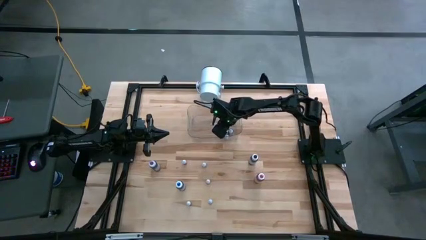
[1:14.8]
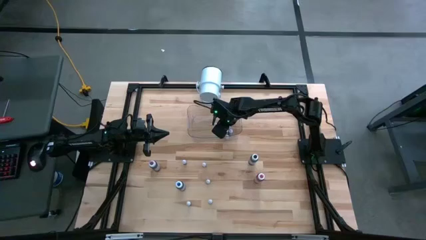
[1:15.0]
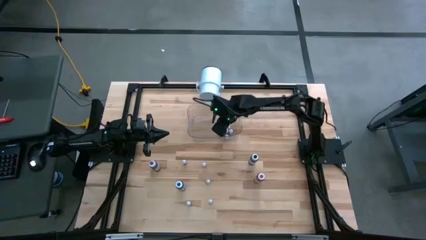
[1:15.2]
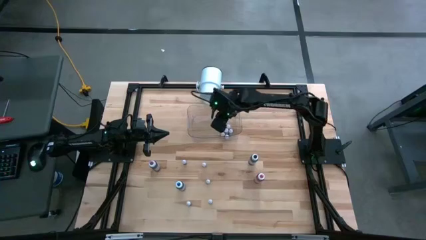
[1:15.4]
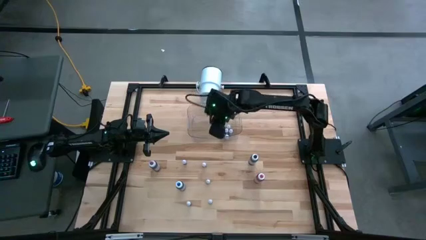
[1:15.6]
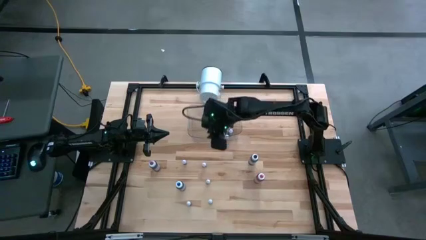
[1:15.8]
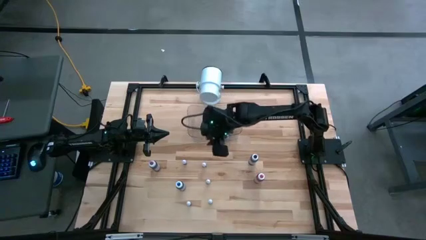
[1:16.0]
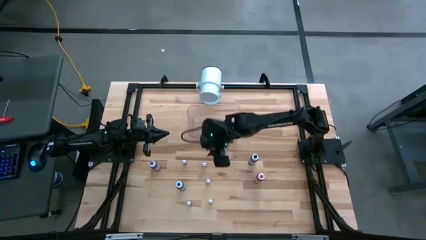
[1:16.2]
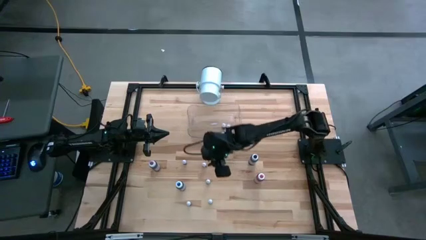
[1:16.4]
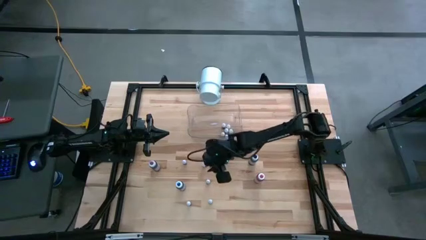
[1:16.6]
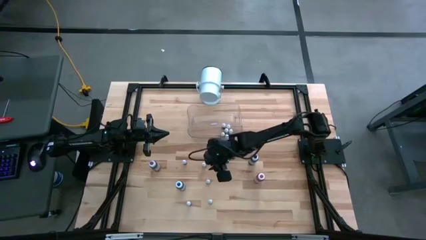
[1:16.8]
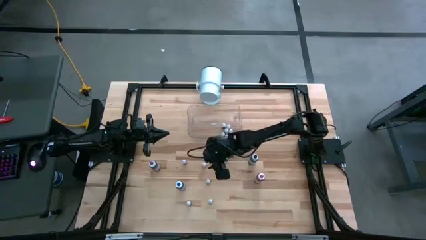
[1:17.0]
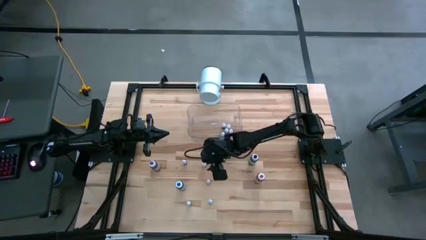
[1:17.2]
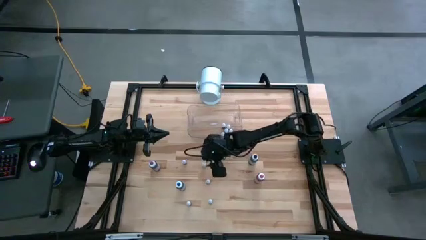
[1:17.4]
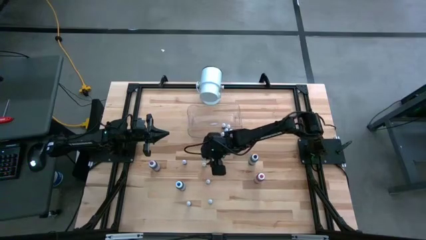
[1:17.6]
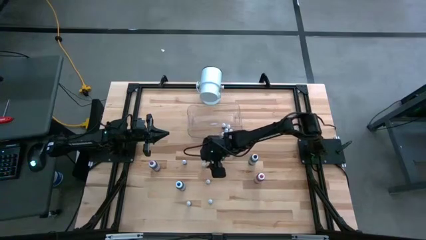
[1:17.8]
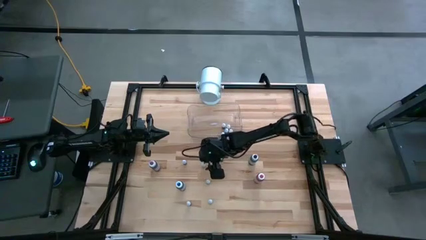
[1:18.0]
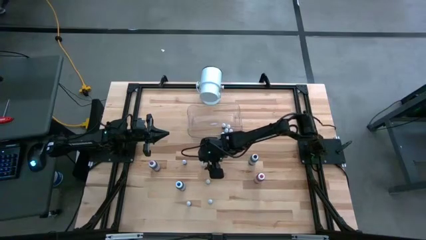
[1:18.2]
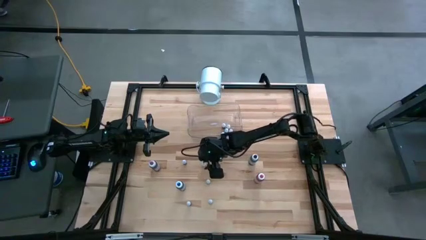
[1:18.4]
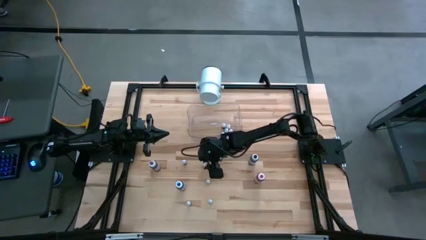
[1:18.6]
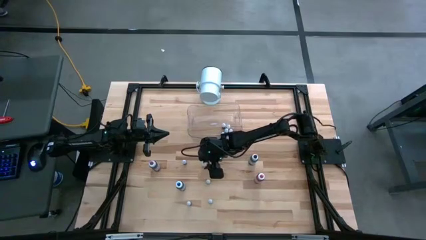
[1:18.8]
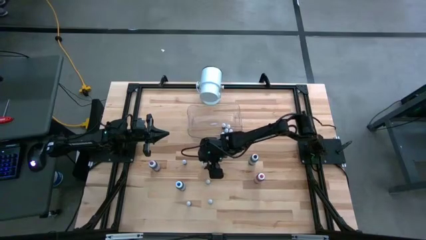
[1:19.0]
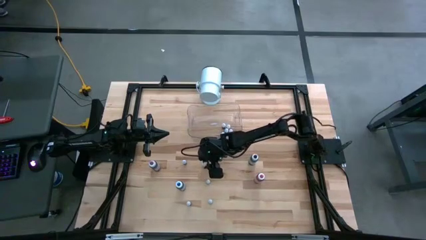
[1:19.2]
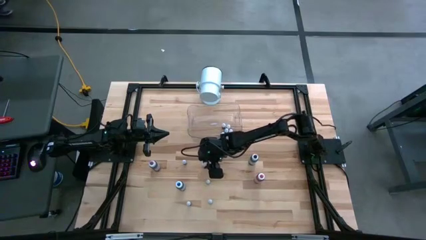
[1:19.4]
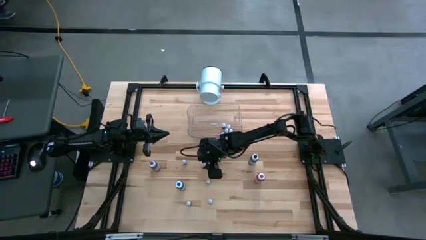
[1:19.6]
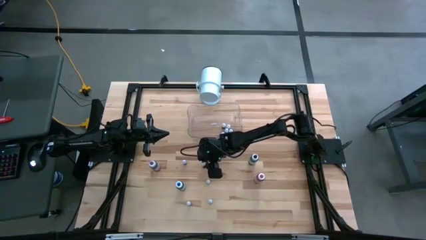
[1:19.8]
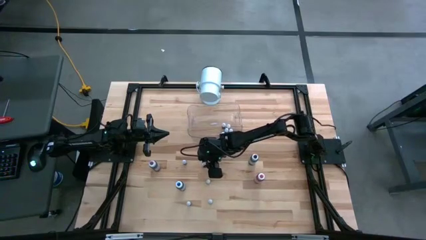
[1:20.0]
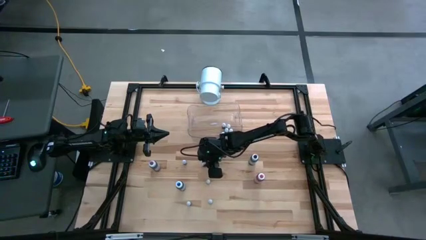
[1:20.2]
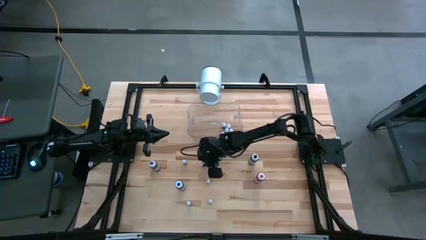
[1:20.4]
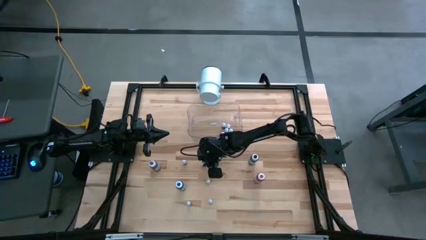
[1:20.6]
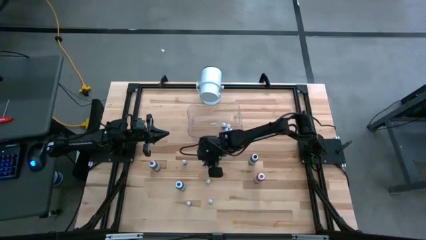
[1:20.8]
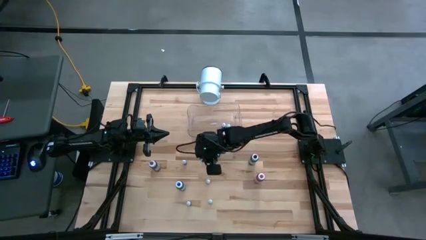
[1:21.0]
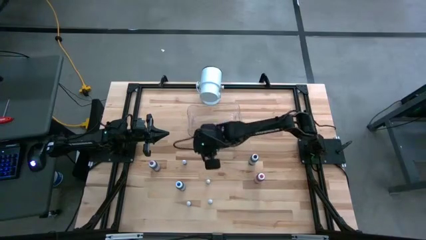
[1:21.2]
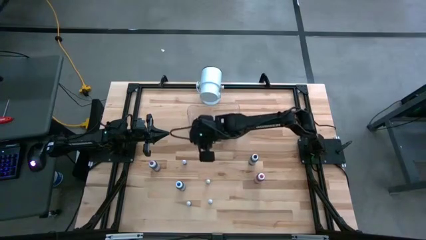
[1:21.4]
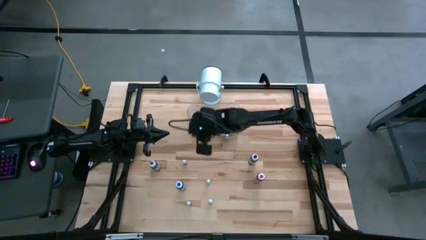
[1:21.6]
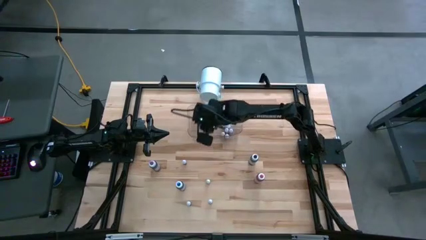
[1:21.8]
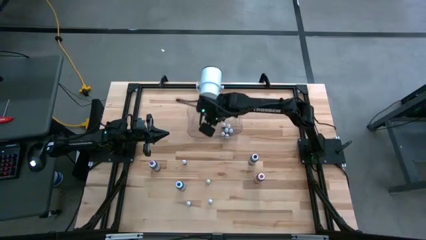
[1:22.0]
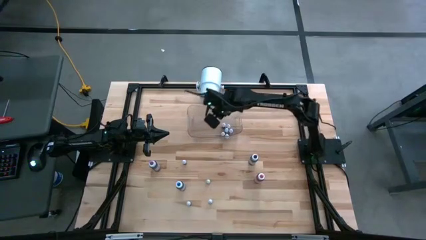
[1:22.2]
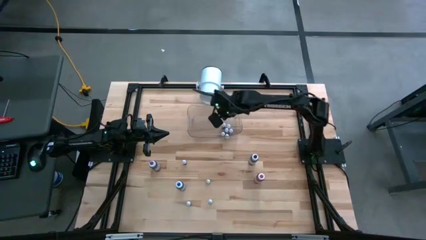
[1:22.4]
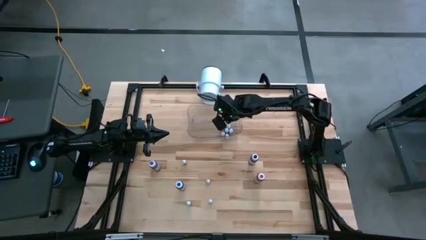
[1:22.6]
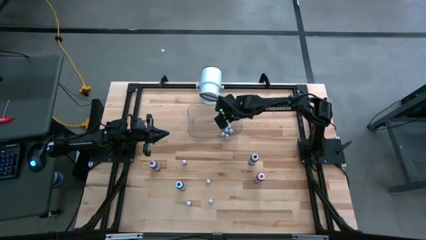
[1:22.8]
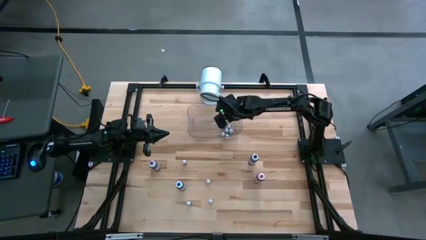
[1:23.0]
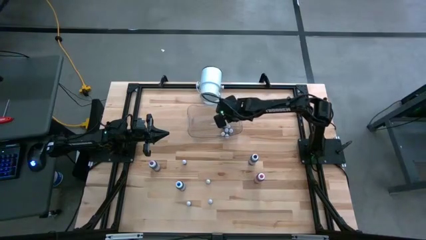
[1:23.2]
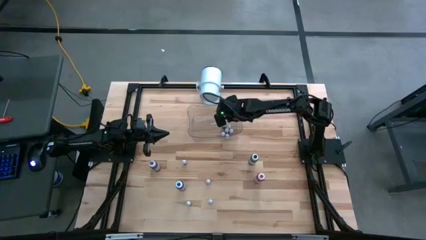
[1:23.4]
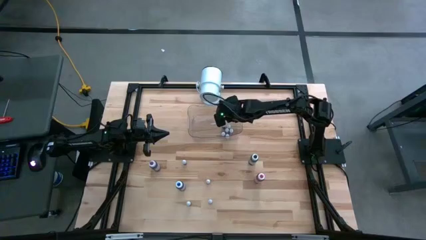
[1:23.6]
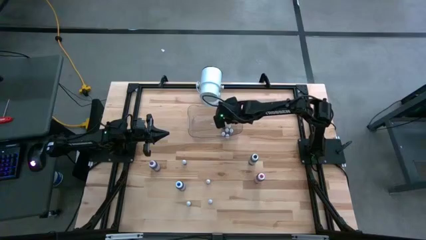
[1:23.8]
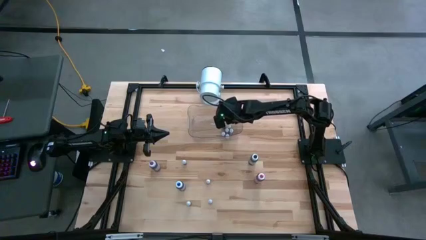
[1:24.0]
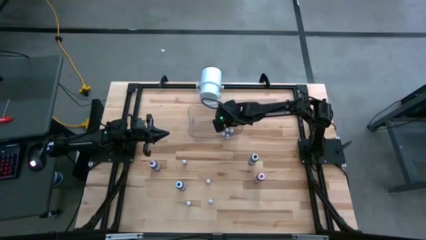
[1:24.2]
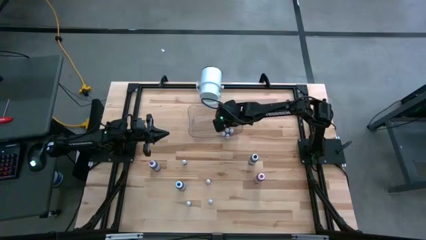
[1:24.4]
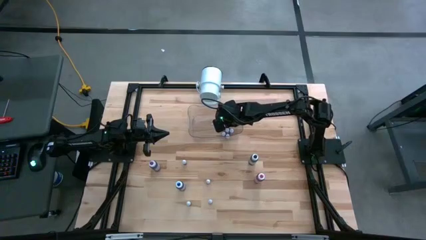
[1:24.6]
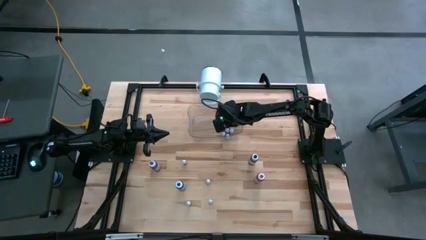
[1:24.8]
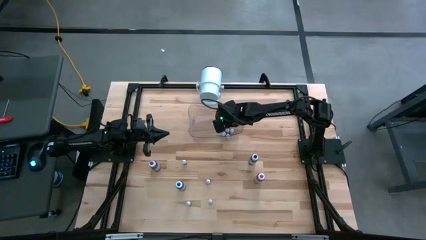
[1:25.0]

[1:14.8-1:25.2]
Task: Pick & Place food coloring
Put the small orange food coloring bottle into the transparent bin
